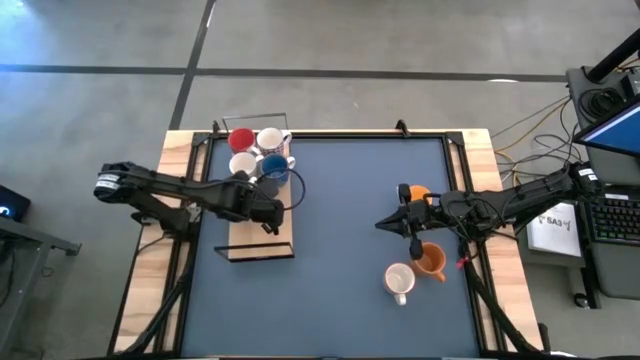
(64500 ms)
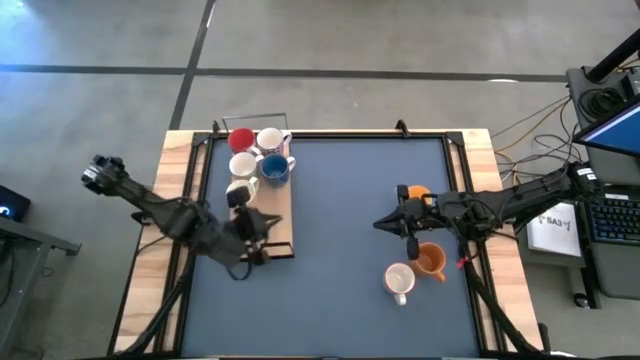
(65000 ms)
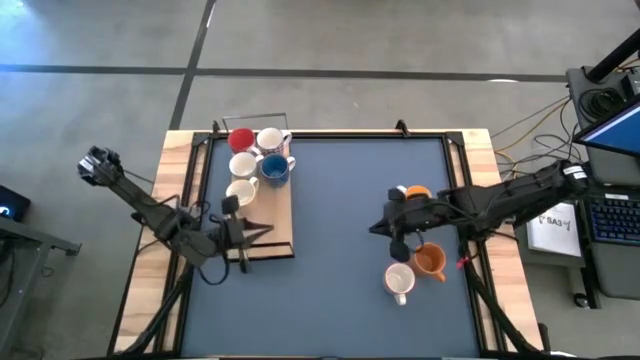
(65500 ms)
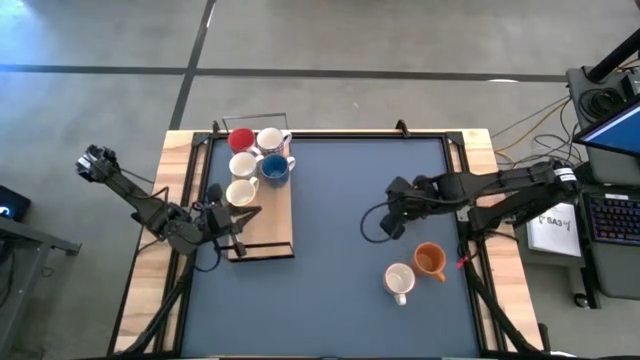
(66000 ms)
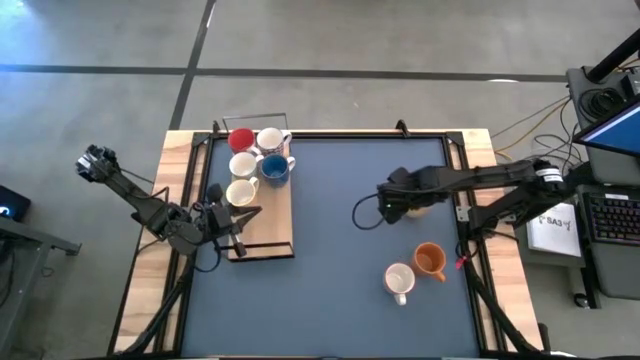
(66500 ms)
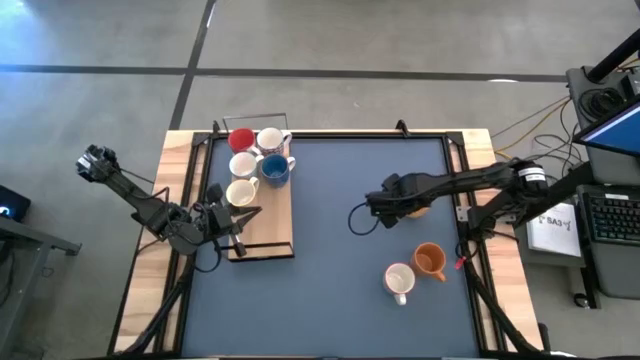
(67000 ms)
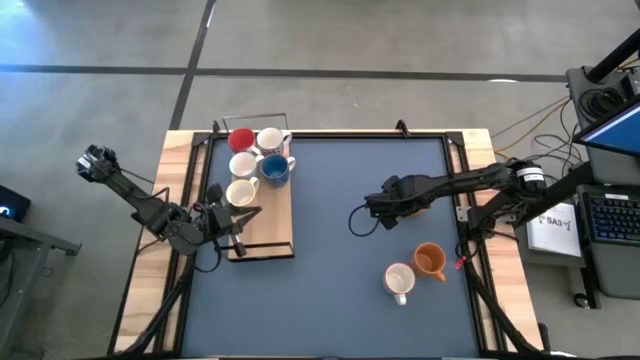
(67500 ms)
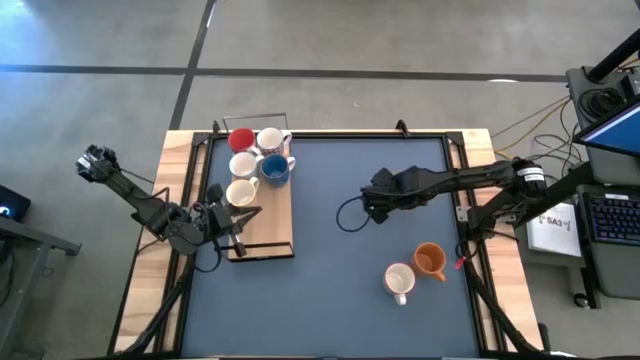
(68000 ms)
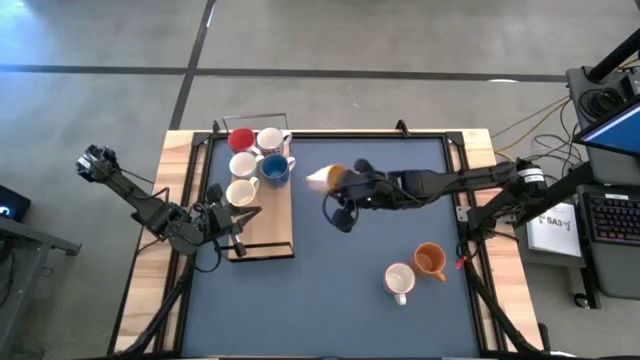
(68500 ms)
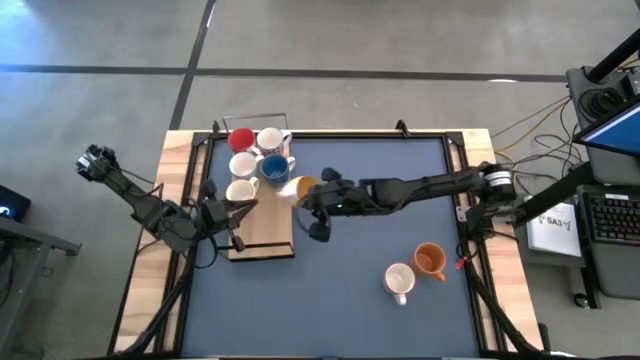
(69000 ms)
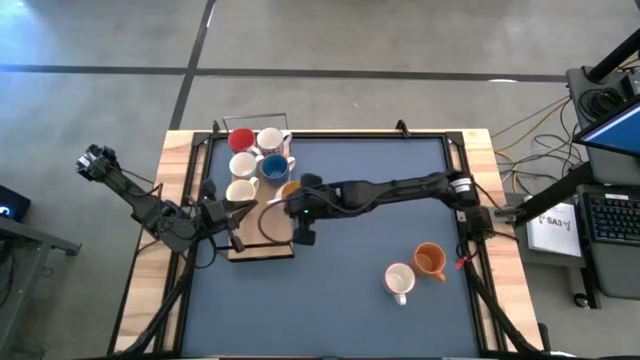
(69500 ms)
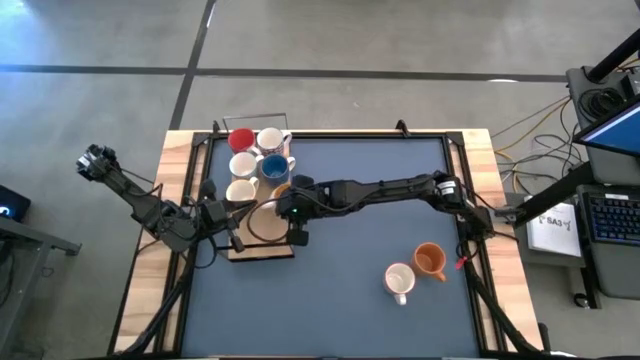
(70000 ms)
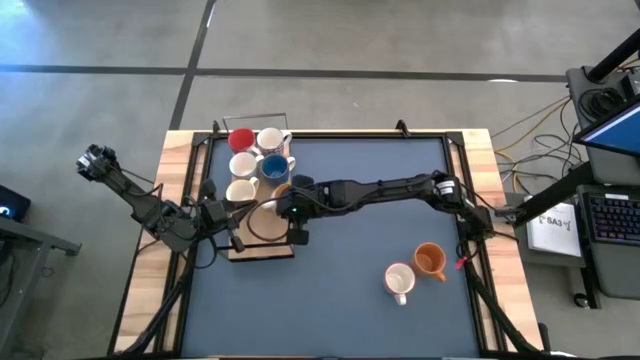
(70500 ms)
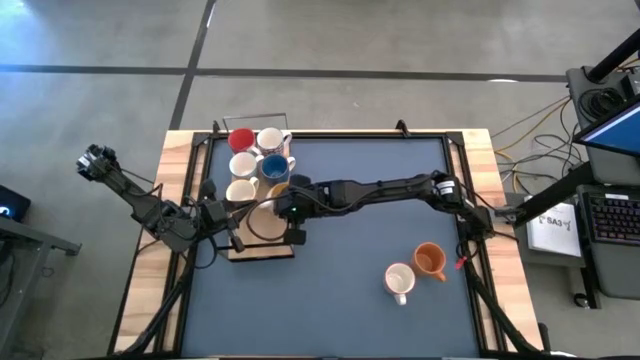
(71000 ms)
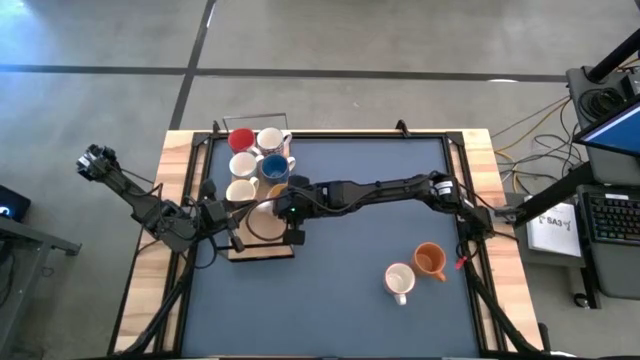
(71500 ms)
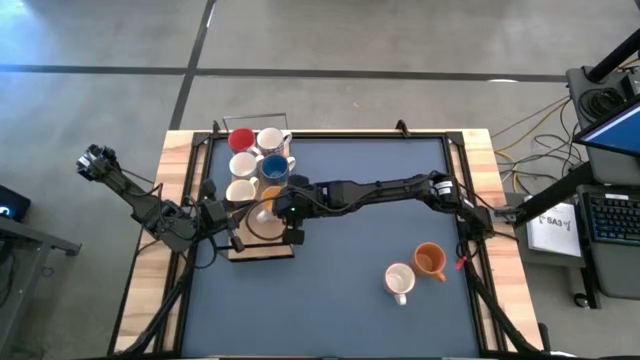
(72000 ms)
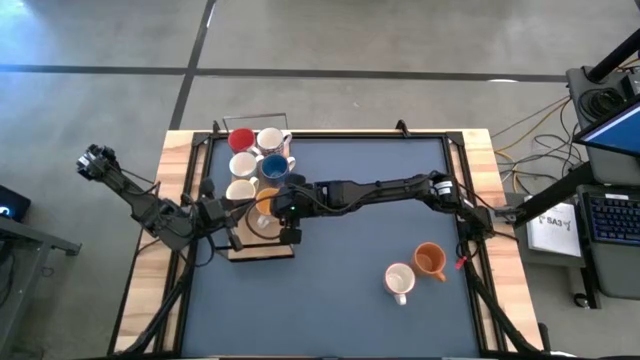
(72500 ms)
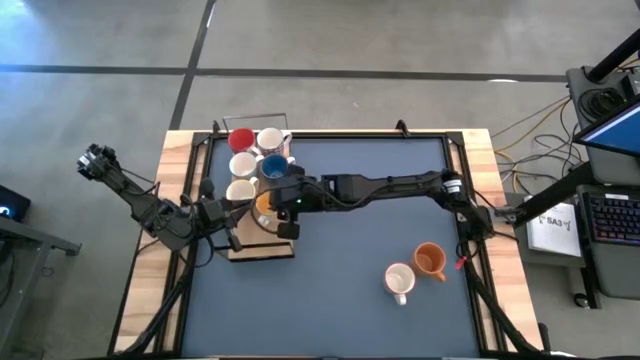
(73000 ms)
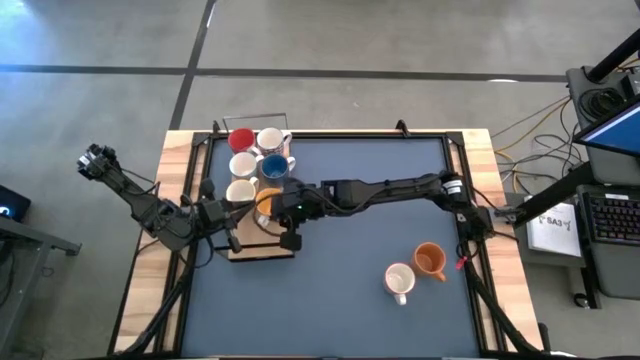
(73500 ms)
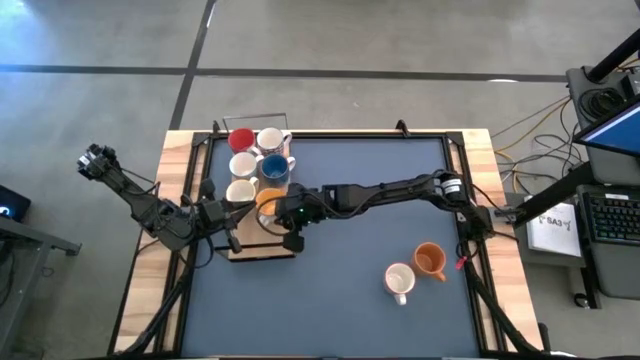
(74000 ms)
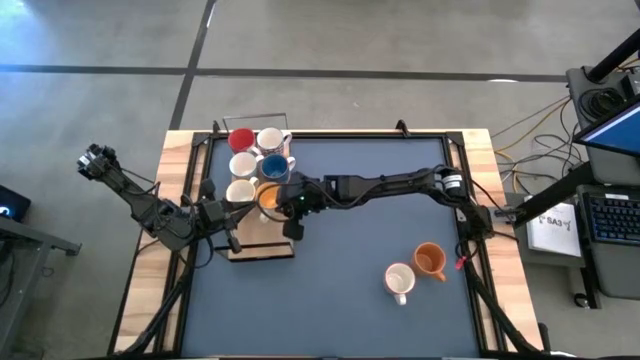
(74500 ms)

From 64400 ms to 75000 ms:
Task: Place coffee mugs
Put the yellow mug on the shelf

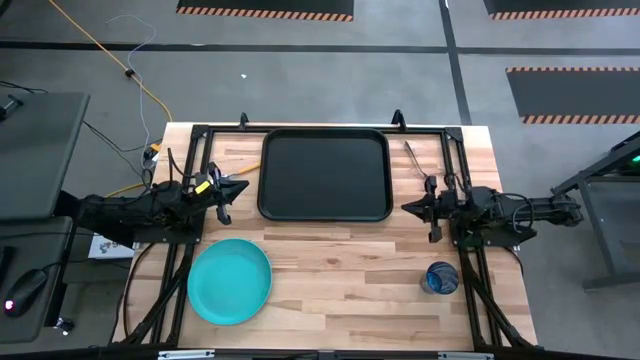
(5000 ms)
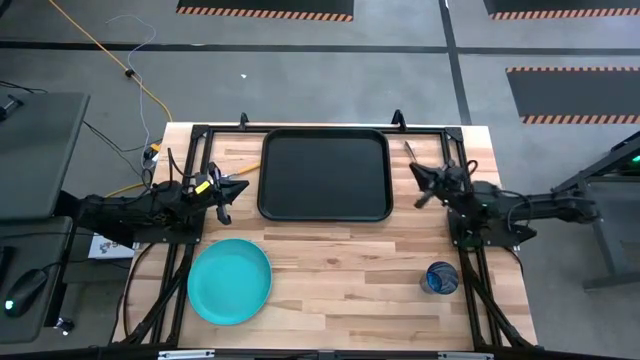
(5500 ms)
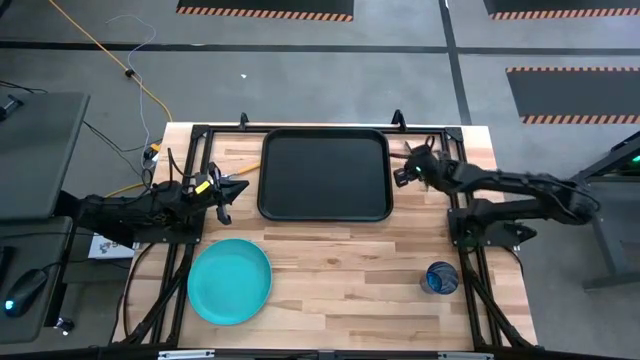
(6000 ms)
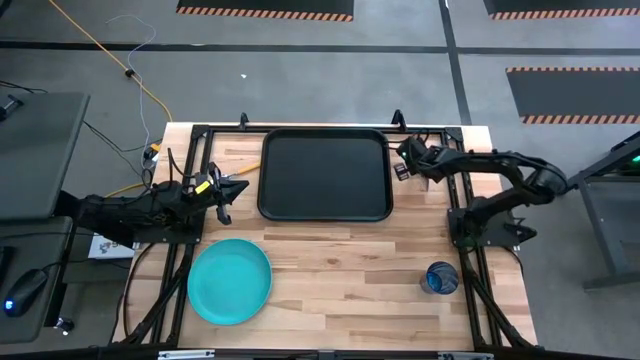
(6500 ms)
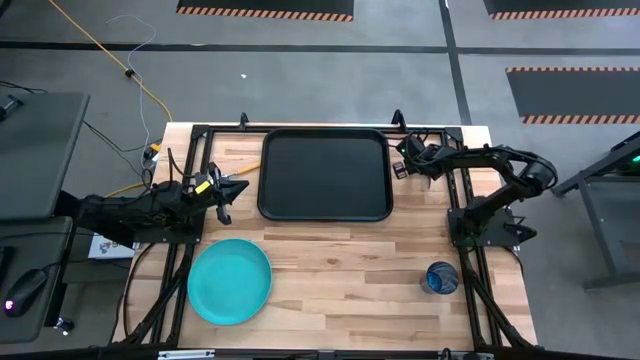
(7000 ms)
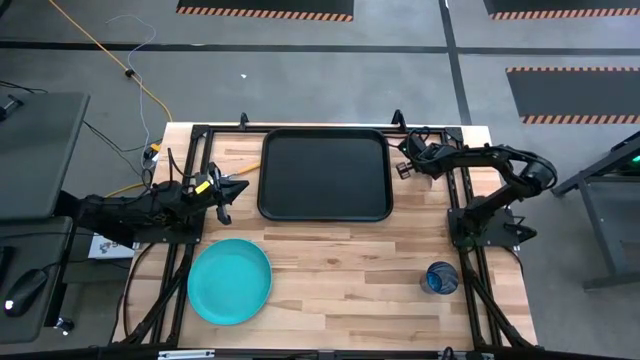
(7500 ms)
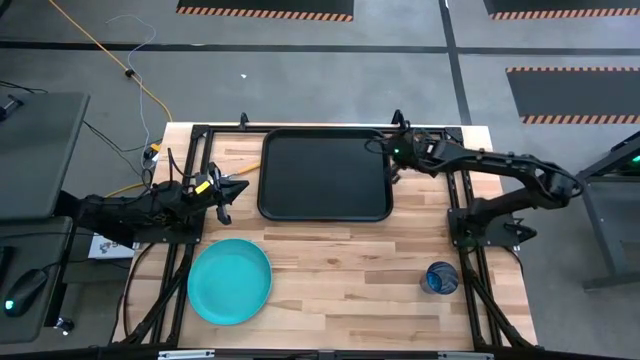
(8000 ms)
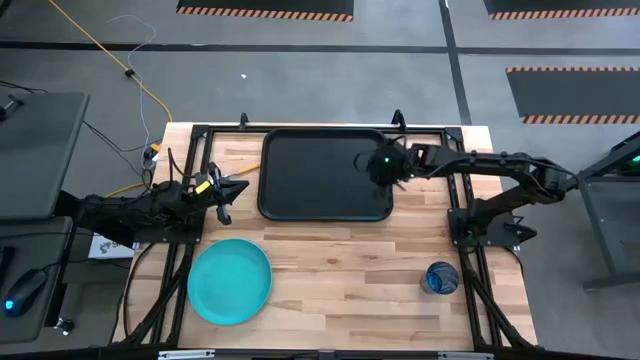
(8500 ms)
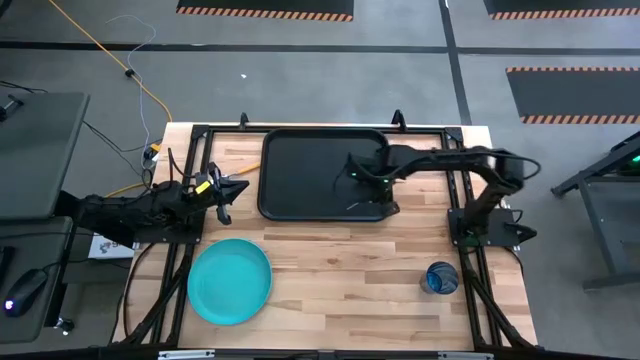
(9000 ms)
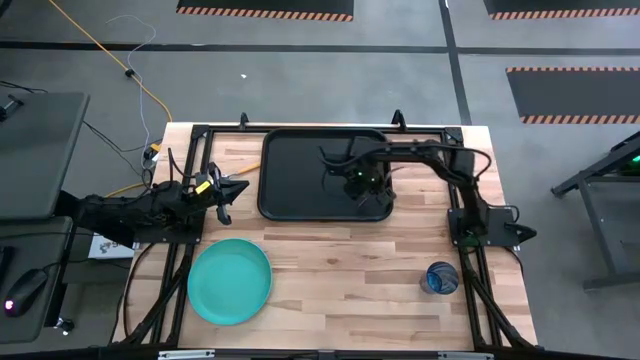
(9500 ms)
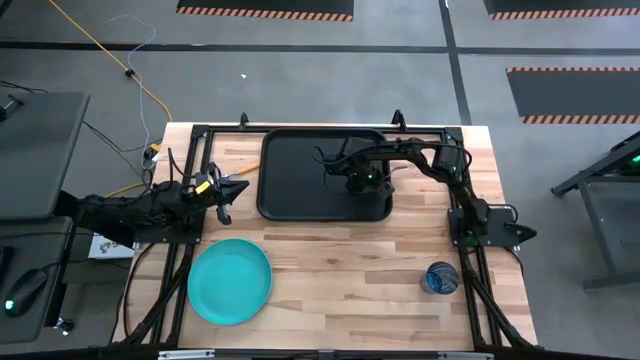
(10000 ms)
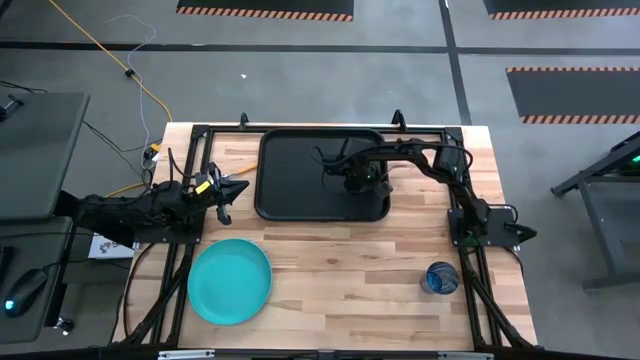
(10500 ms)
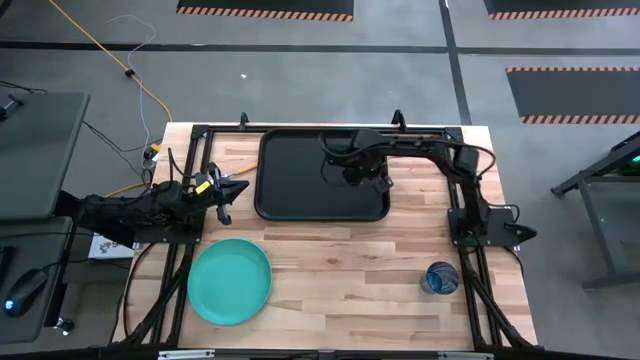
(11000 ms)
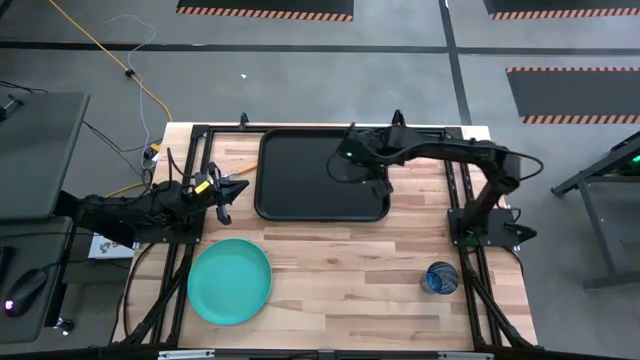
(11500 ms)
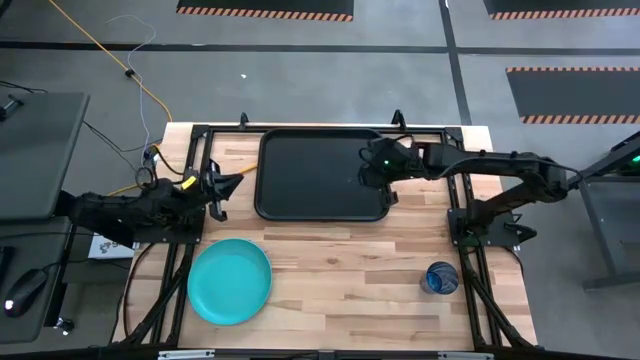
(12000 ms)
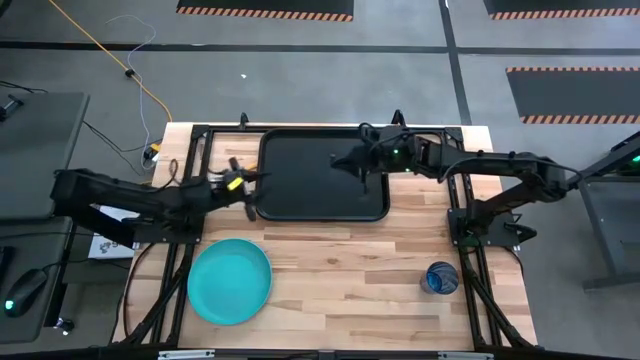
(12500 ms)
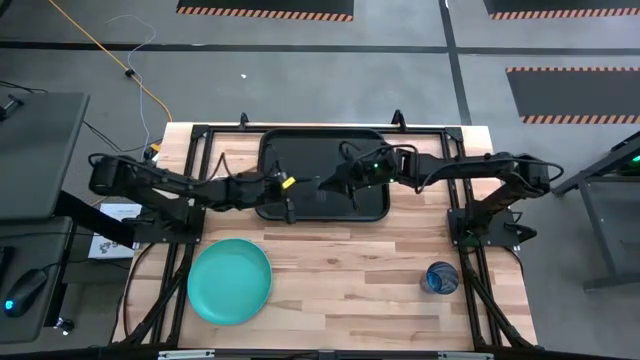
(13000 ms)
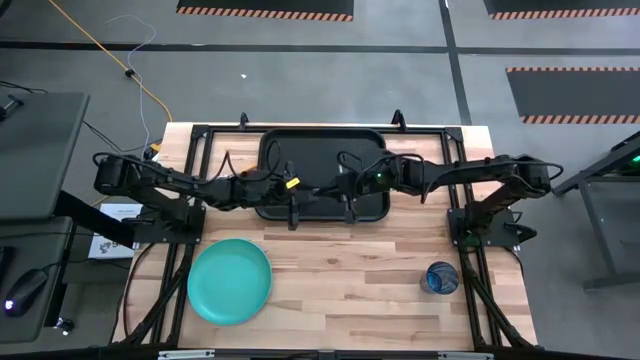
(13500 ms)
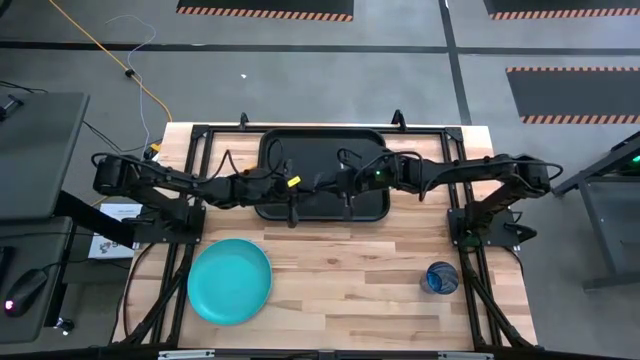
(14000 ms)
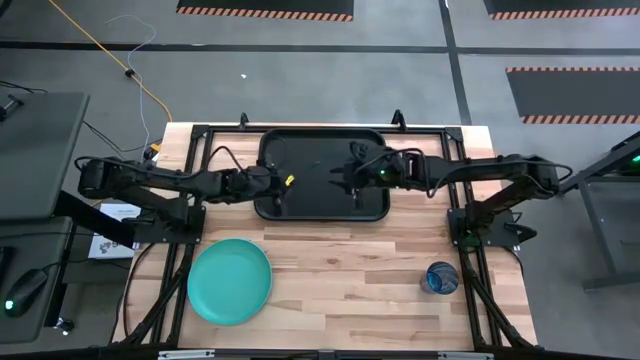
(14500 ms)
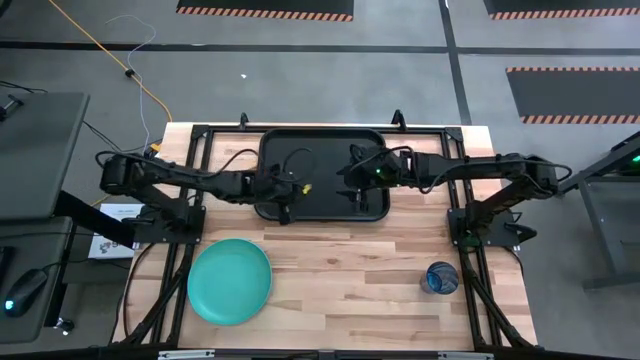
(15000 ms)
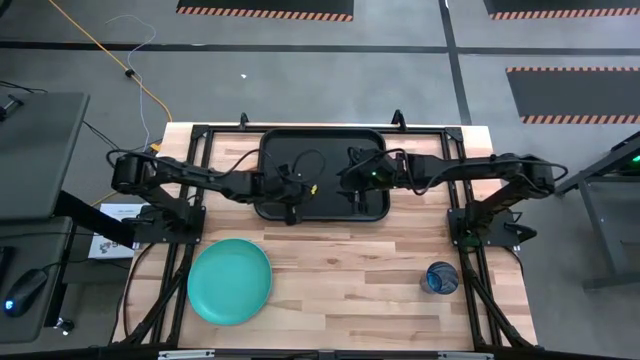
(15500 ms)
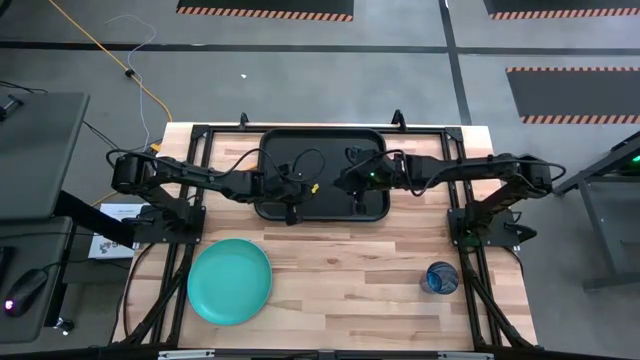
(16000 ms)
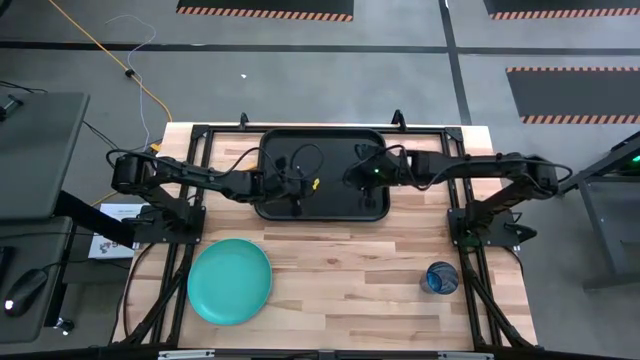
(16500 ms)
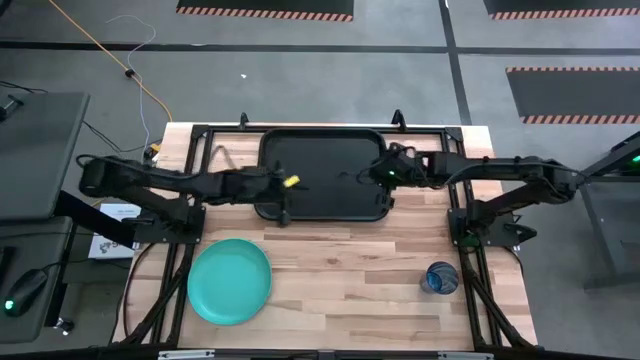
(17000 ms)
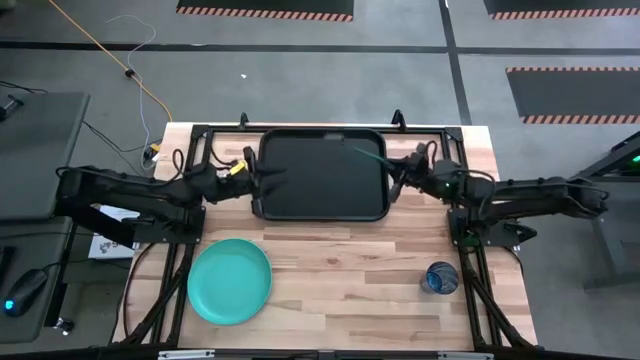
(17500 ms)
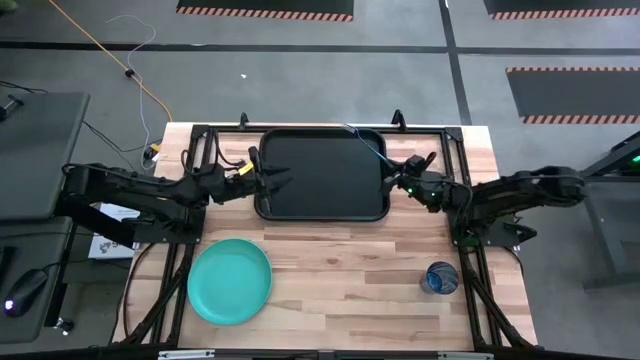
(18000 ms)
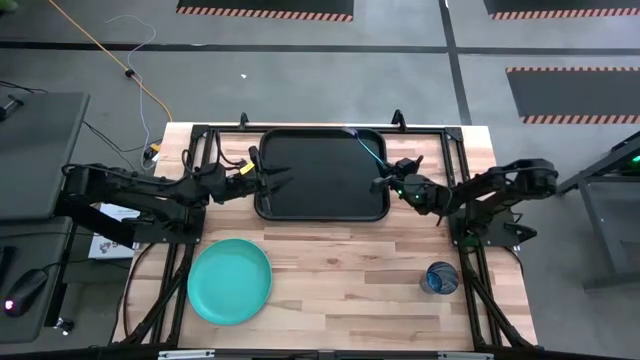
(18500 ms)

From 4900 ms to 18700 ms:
Task: Pick and place plate/cup/fork/spoon on tray
Put the blue fork on the black tray
